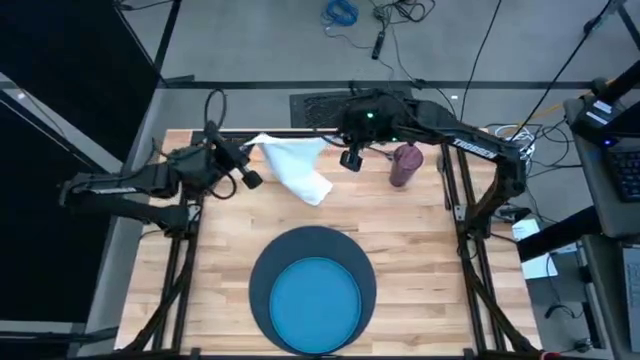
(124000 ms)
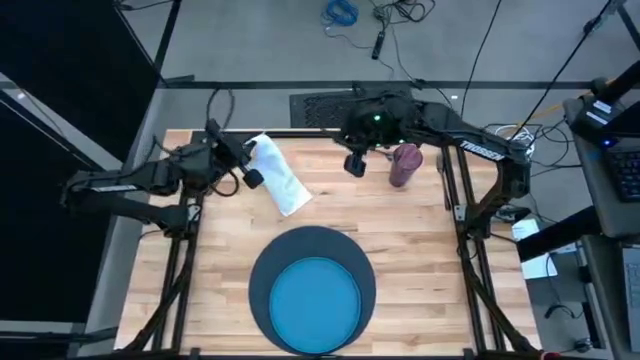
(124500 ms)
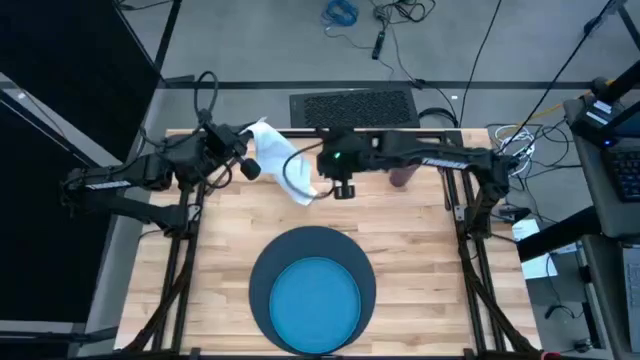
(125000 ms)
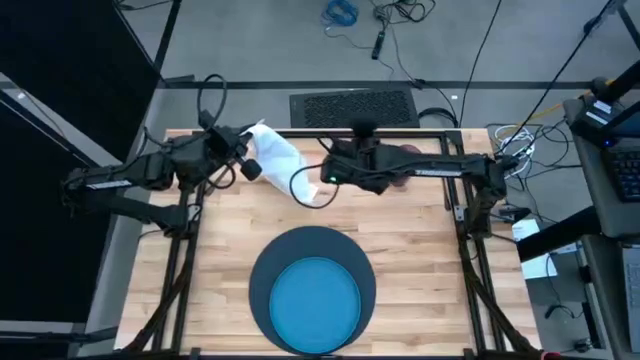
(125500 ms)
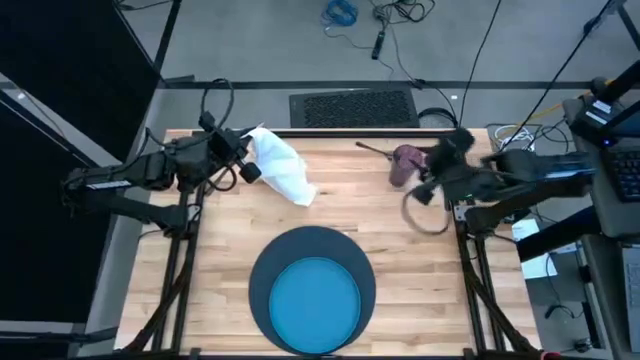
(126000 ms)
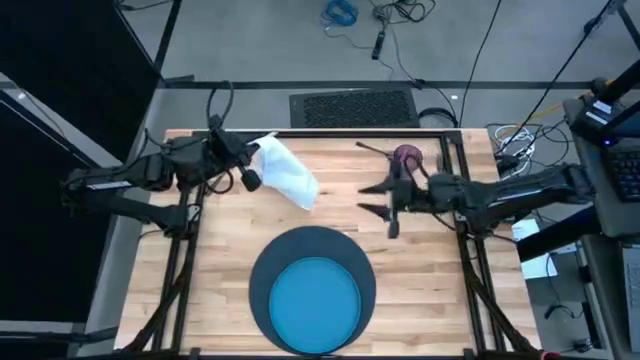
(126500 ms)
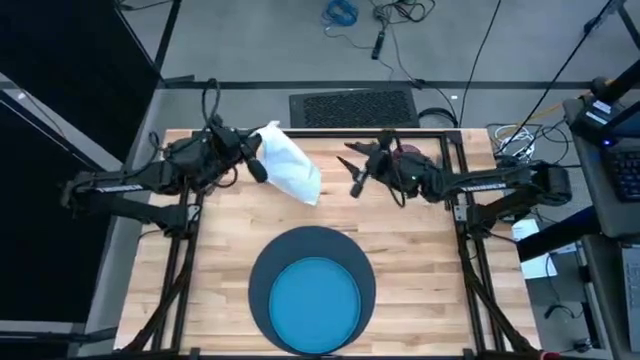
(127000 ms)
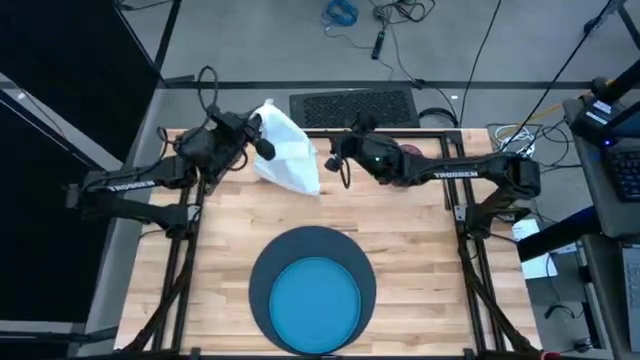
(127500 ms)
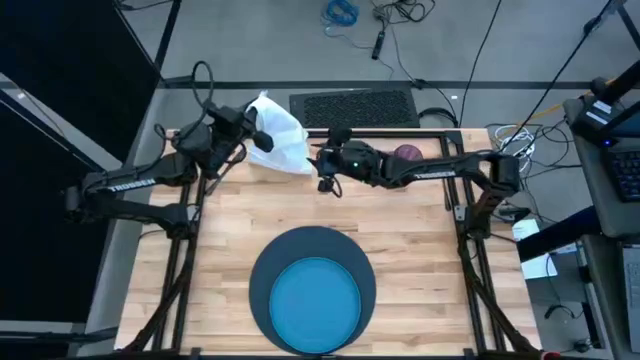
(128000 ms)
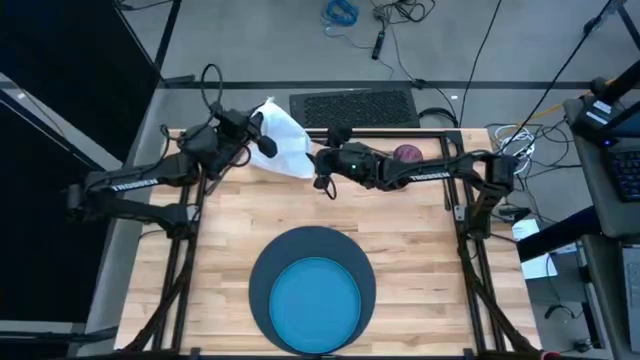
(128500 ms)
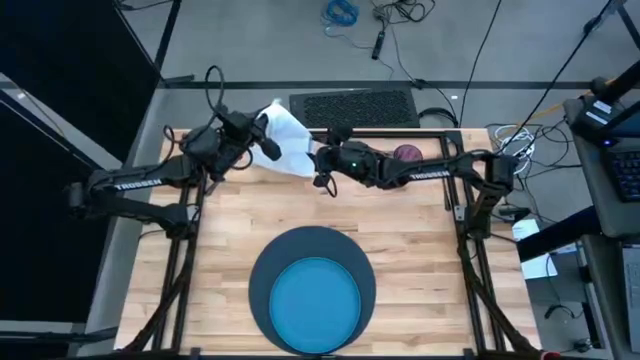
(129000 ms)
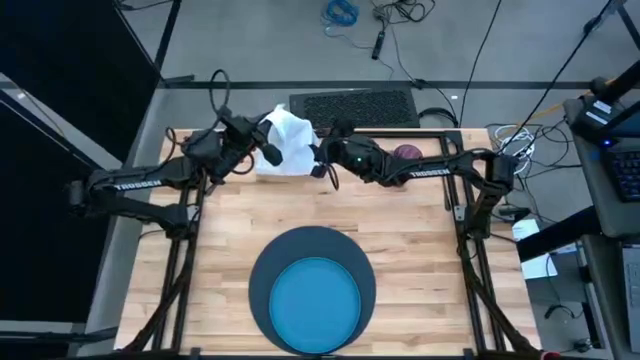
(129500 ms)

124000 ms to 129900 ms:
Task: Set table place
Fold the white napkin

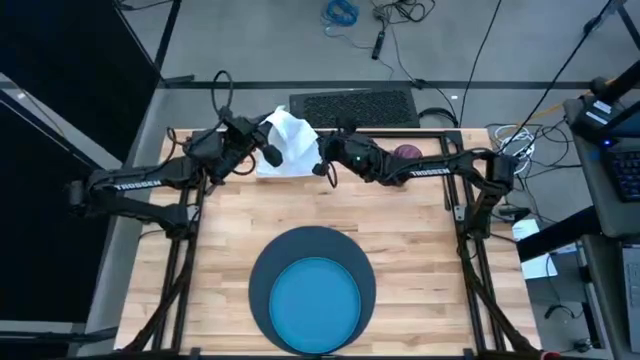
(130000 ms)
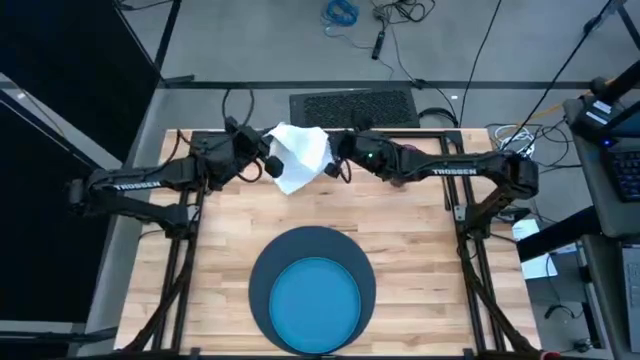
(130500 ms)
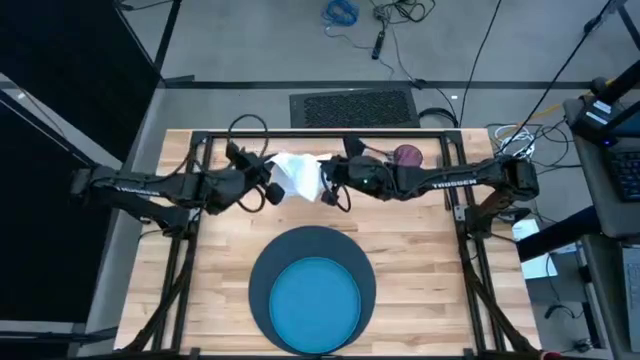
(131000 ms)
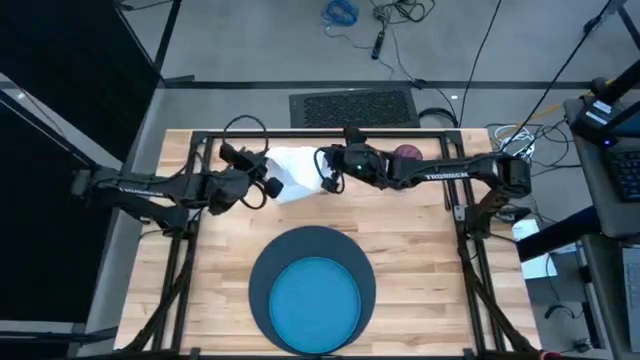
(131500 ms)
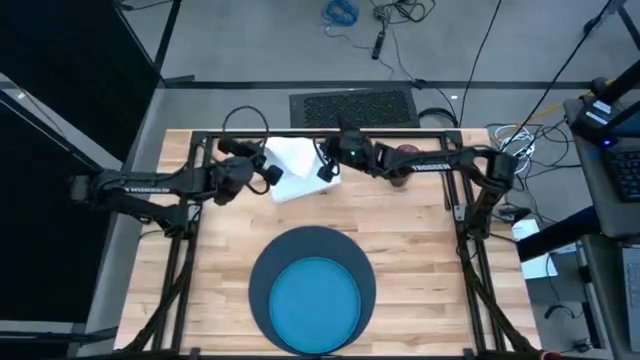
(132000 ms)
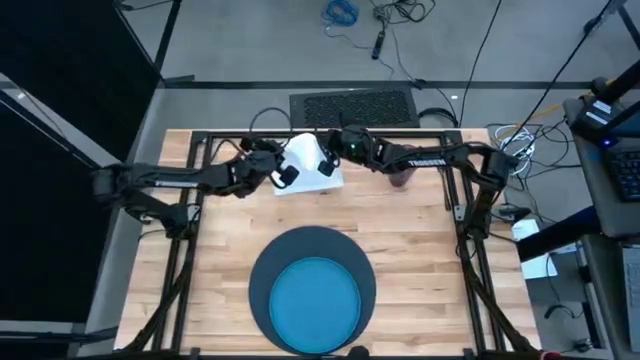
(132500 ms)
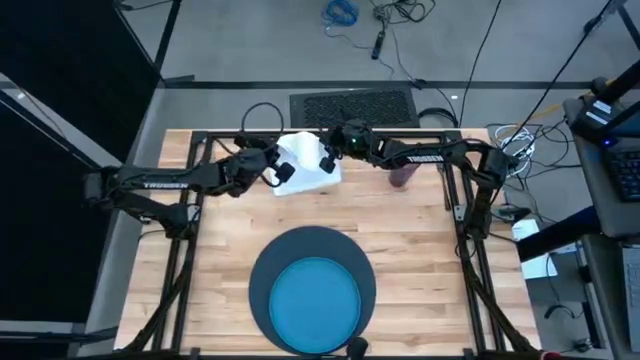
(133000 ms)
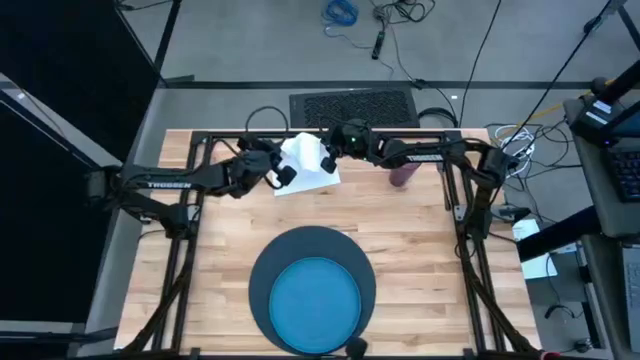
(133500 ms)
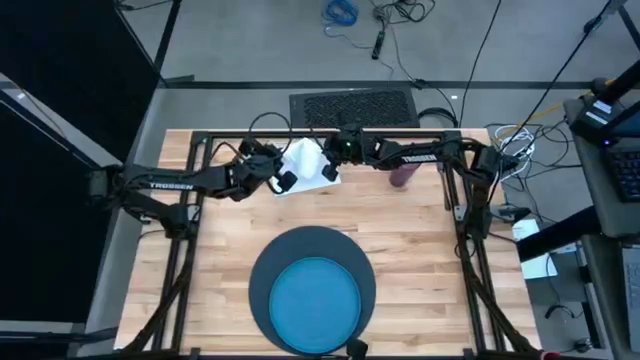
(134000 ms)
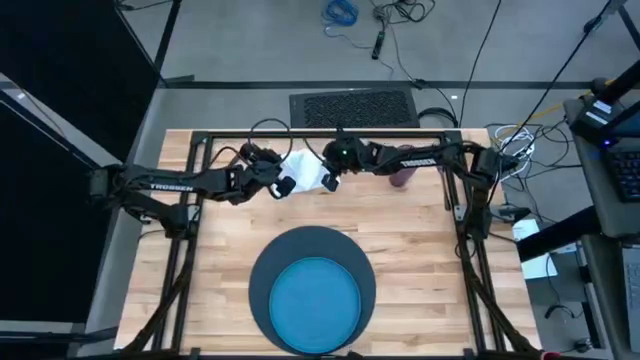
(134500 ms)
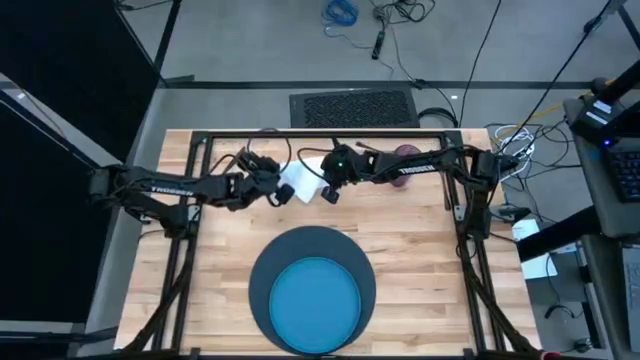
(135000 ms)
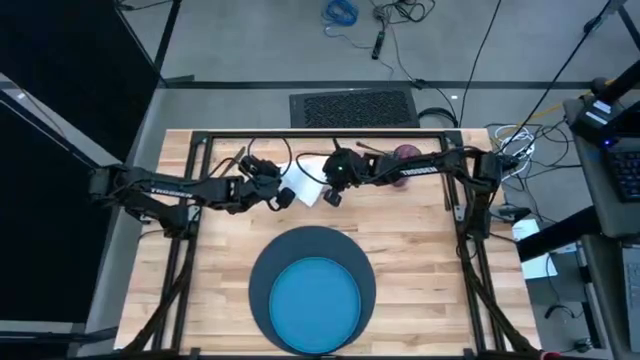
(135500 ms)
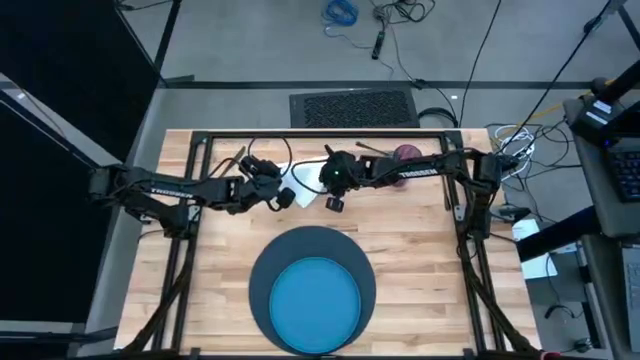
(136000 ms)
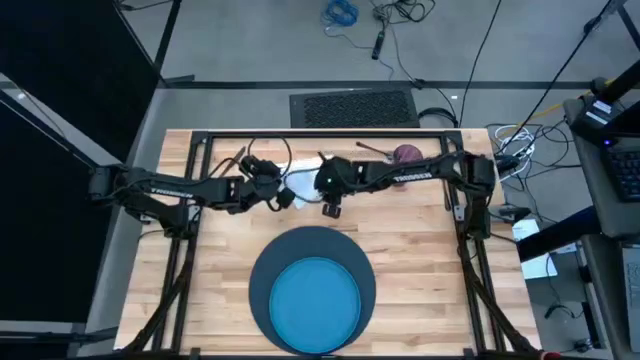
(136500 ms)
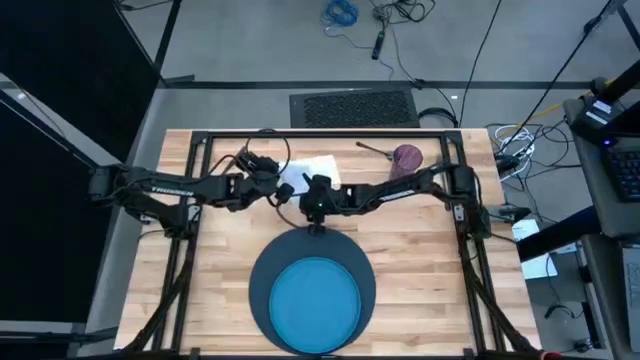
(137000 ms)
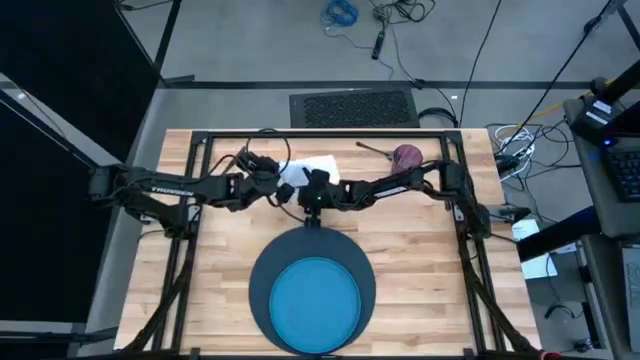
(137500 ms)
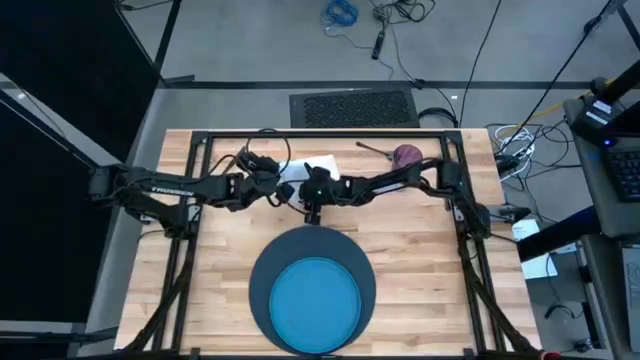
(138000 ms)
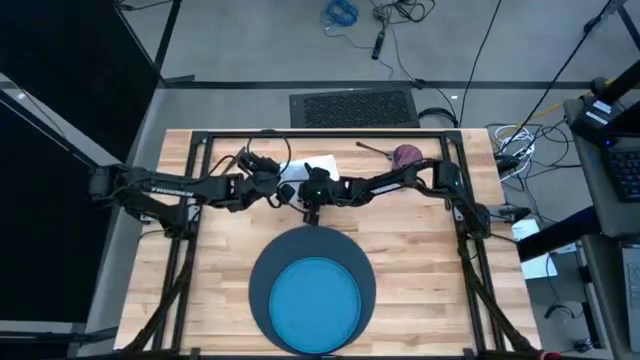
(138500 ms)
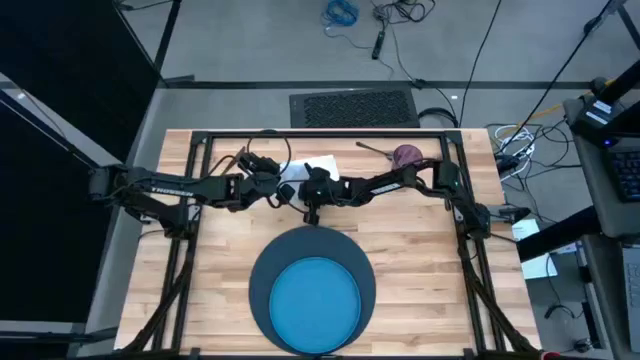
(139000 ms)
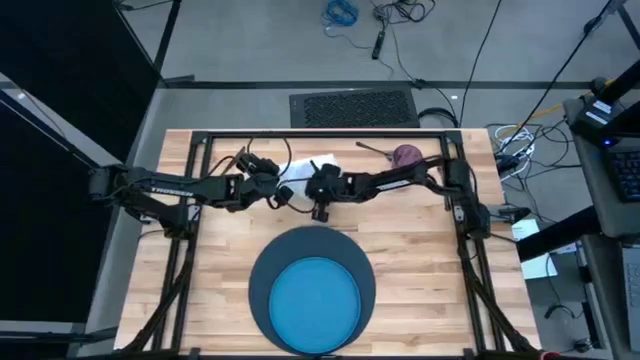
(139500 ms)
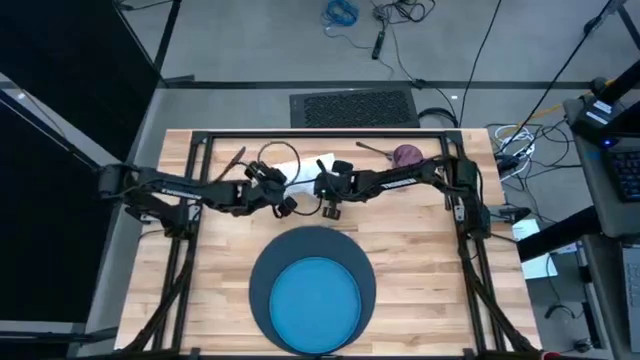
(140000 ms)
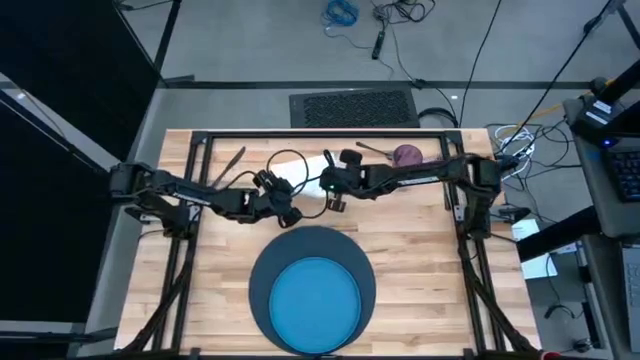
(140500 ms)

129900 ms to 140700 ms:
Fold the white napkin

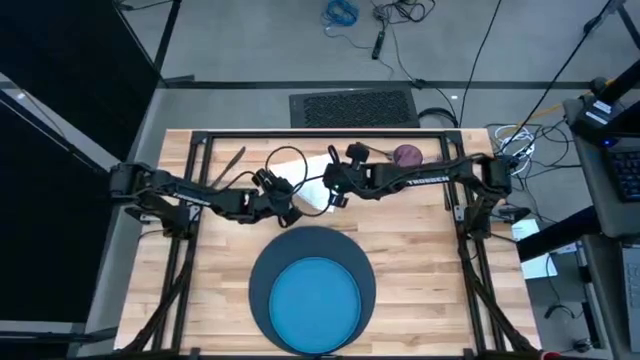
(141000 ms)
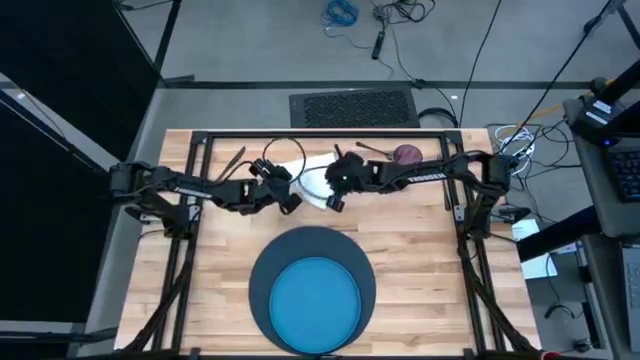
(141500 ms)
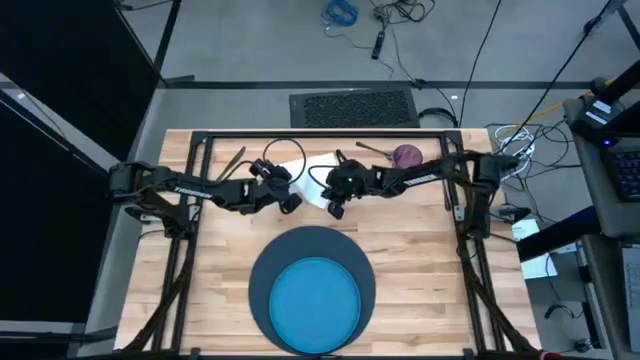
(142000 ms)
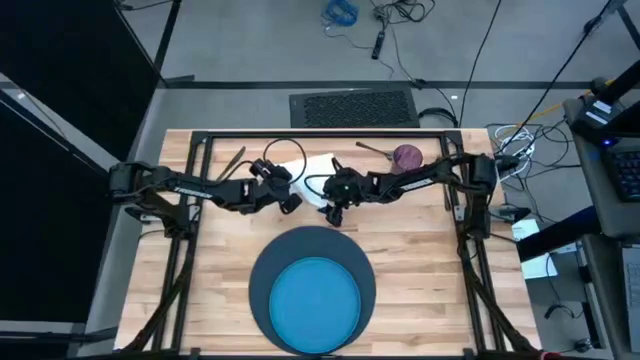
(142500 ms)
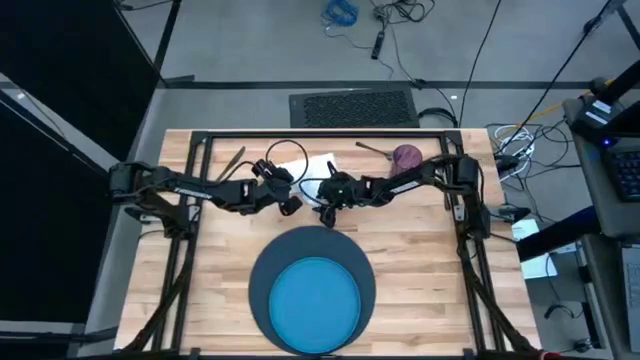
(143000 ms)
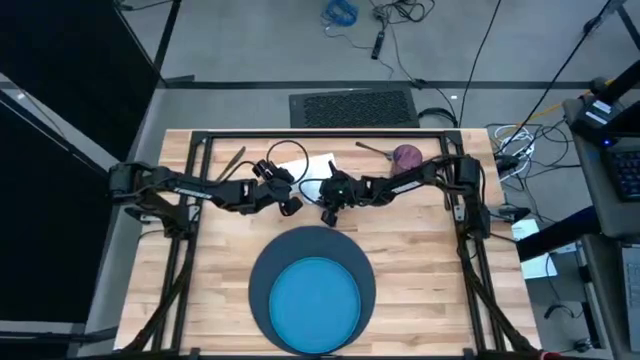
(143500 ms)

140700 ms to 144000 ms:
Fold the white napkin

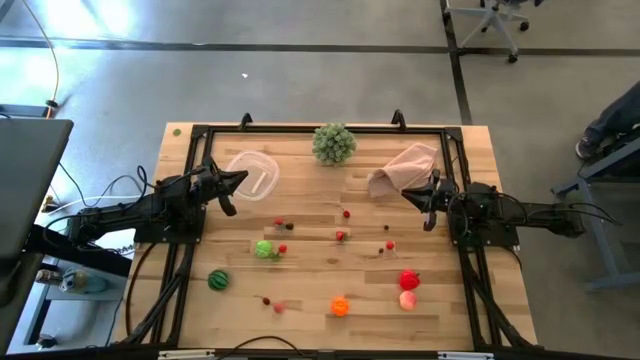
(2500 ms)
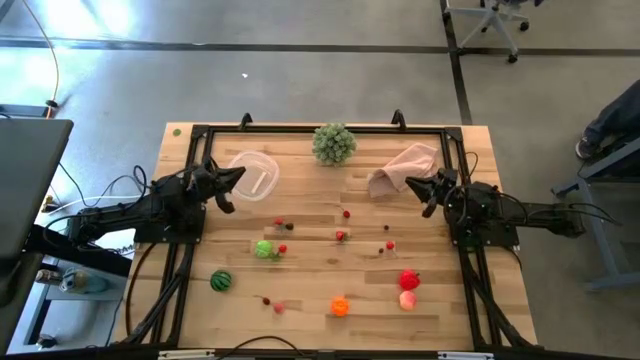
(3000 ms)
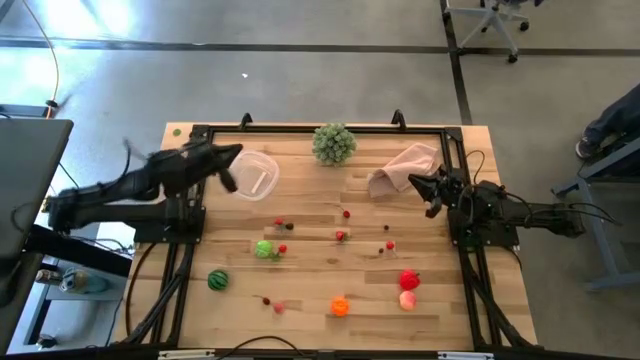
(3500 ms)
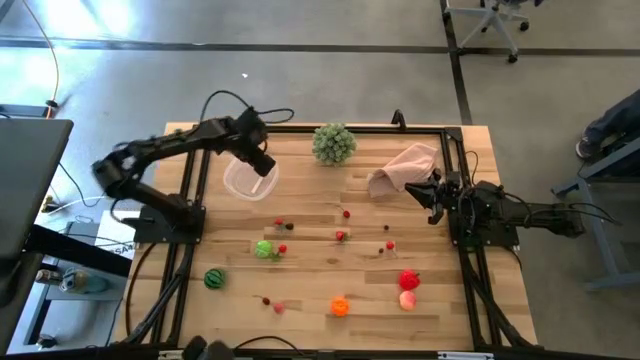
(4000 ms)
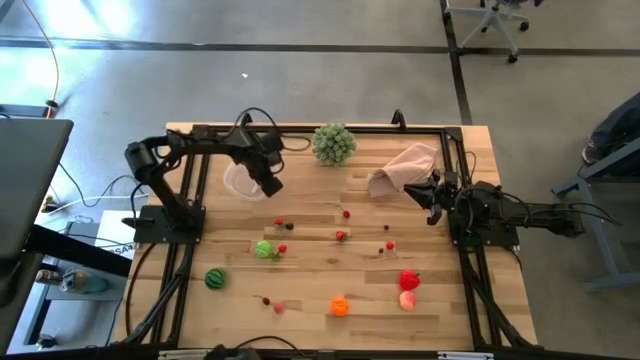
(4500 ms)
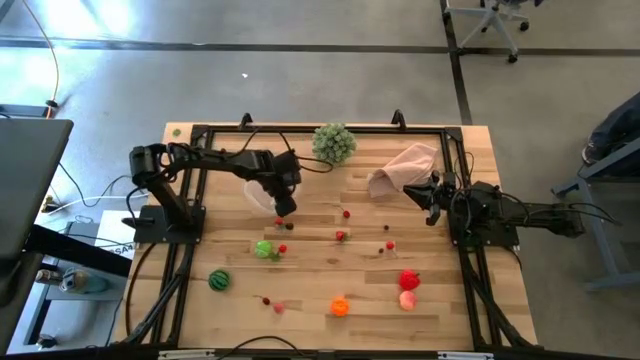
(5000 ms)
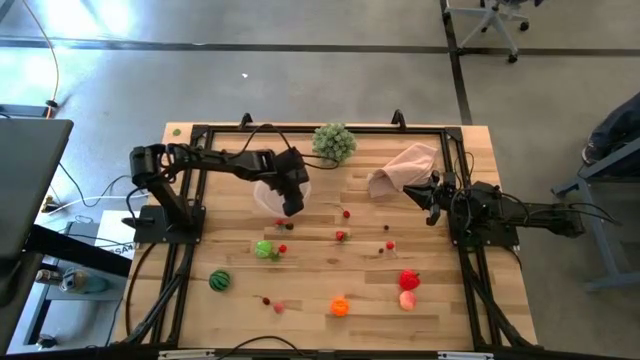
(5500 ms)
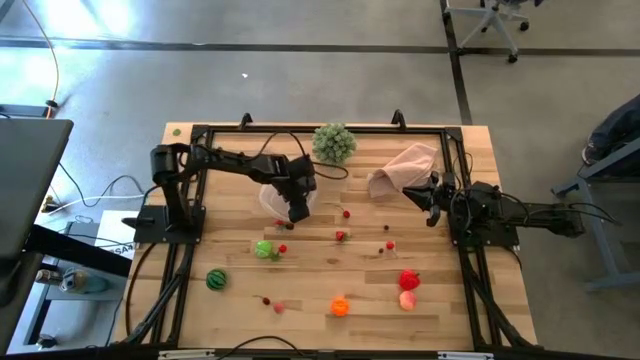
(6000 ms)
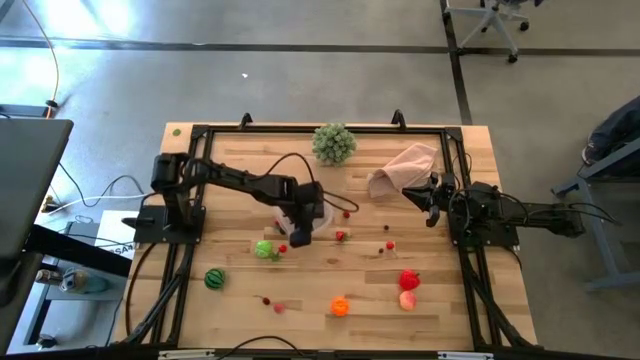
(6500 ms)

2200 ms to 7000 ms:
Task: Pick and placing Produce into tupperware
Move the transparent bin to the middle of the table
